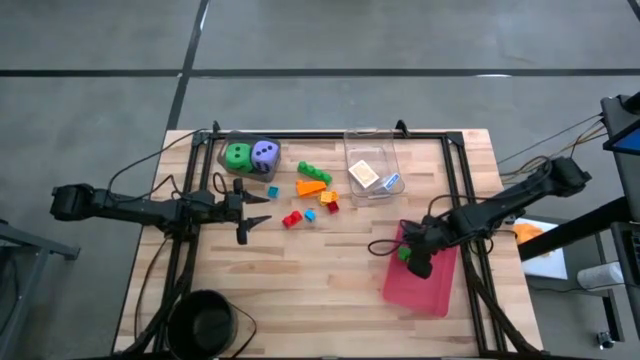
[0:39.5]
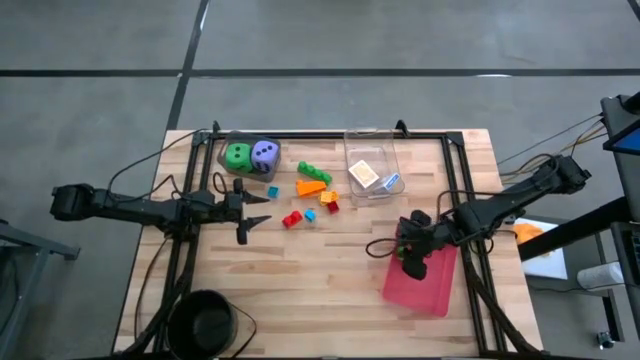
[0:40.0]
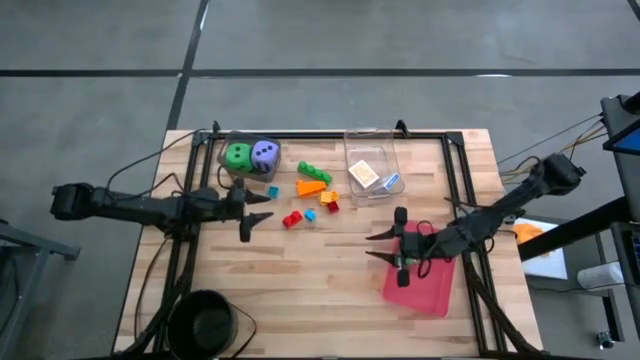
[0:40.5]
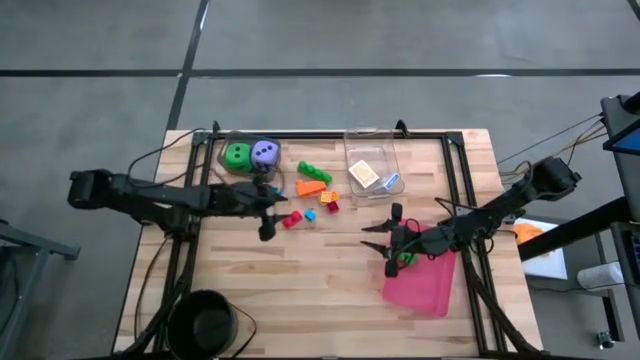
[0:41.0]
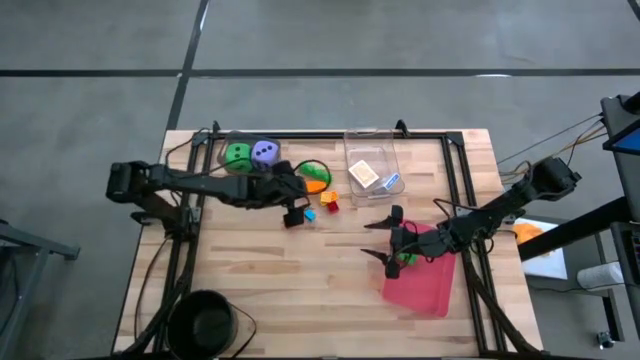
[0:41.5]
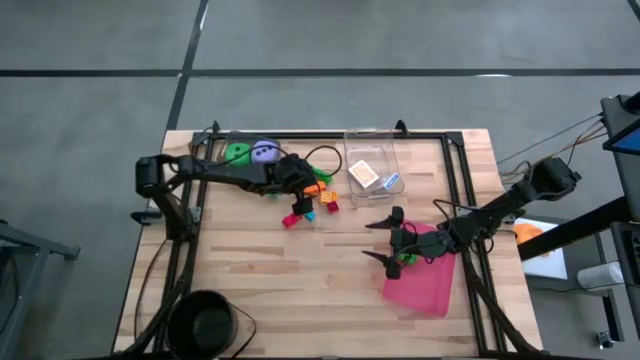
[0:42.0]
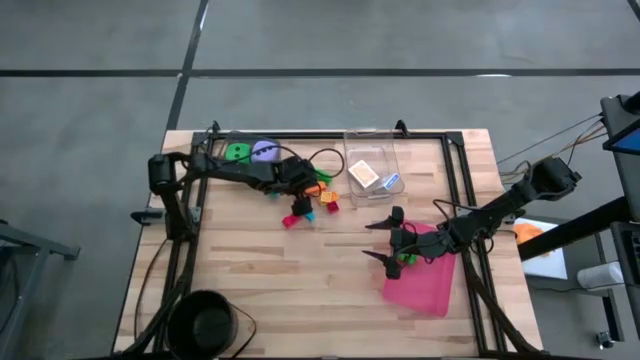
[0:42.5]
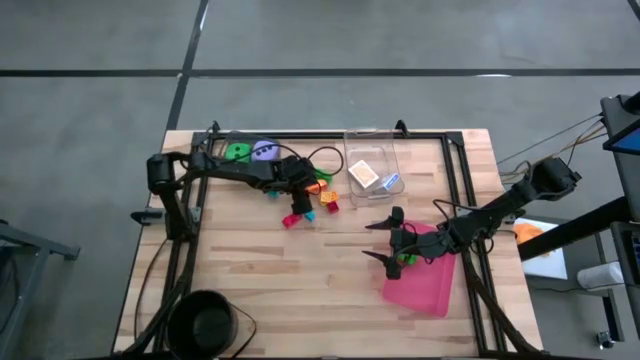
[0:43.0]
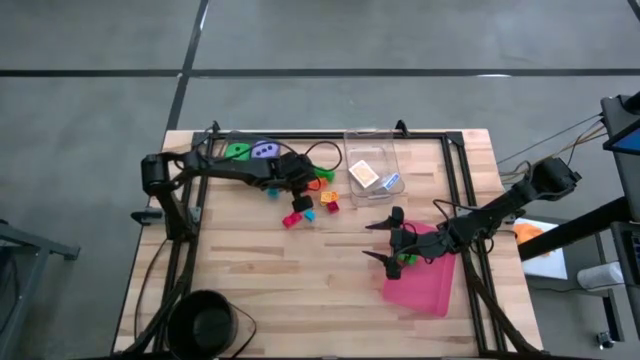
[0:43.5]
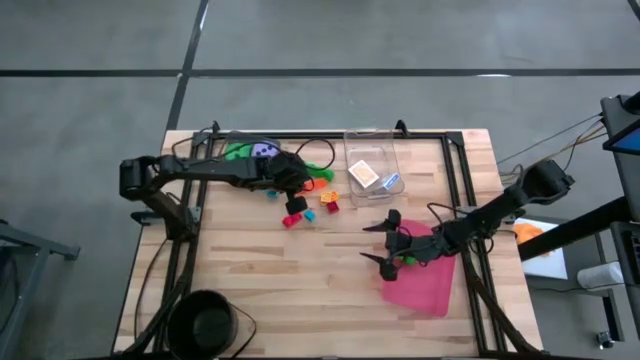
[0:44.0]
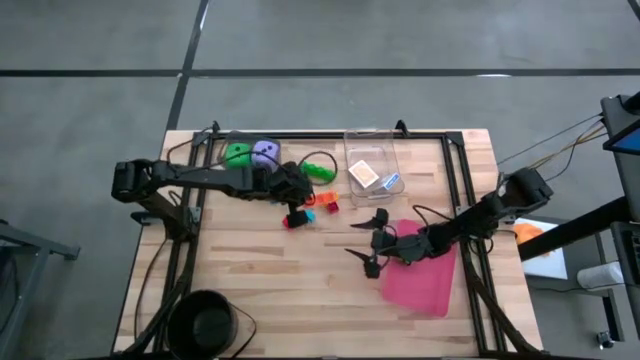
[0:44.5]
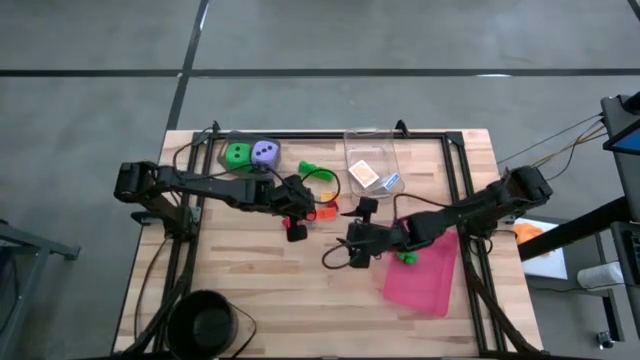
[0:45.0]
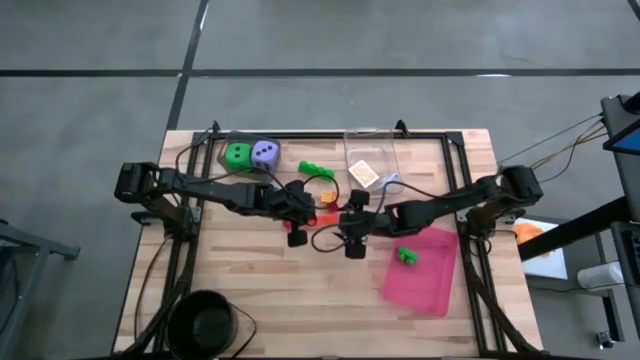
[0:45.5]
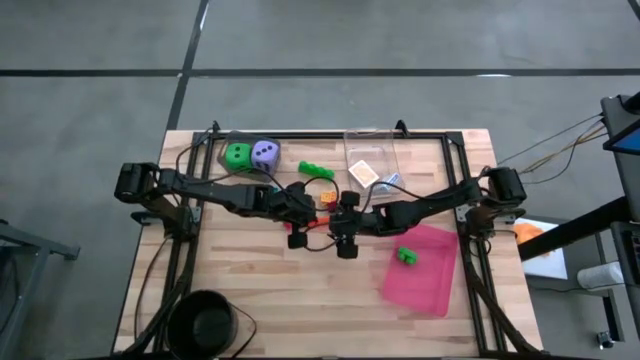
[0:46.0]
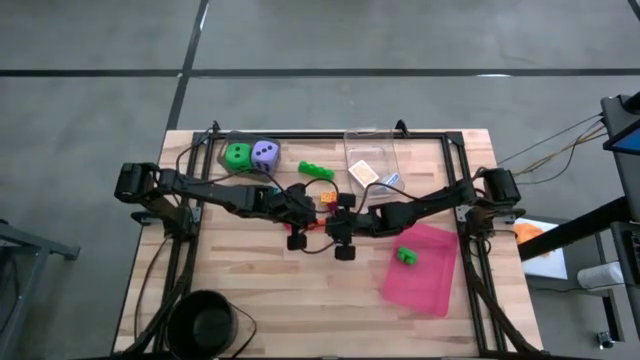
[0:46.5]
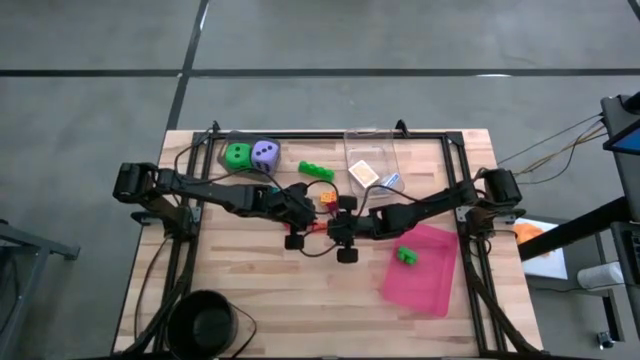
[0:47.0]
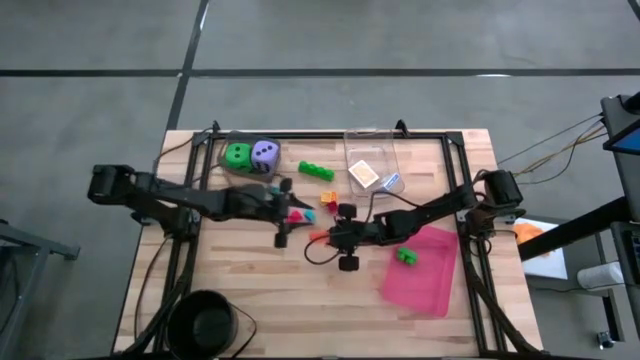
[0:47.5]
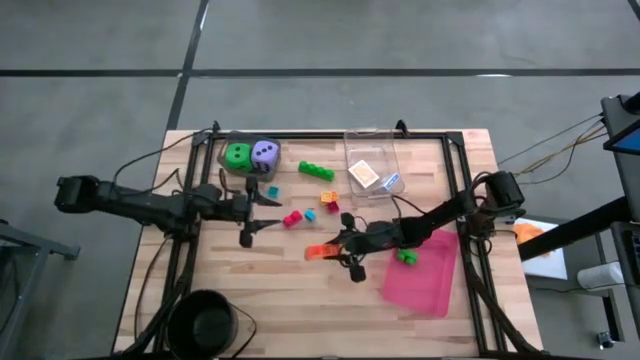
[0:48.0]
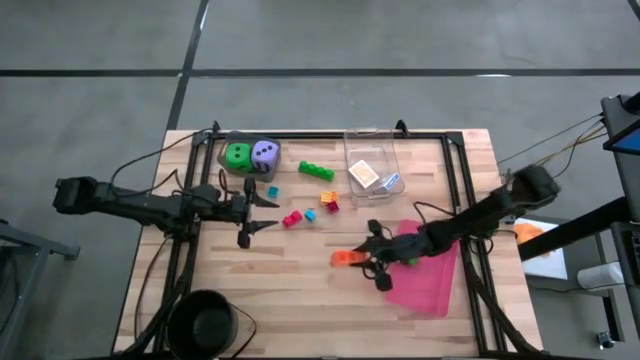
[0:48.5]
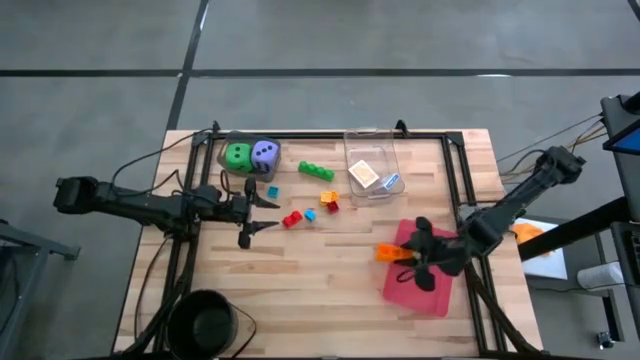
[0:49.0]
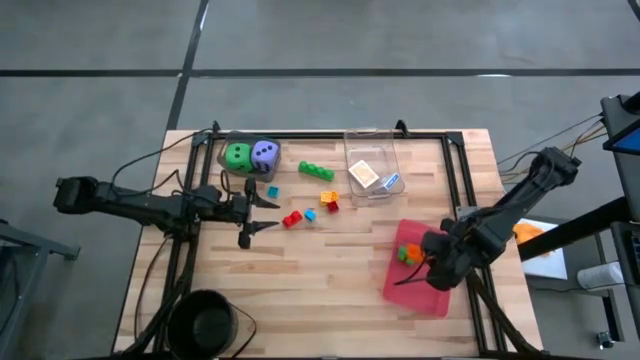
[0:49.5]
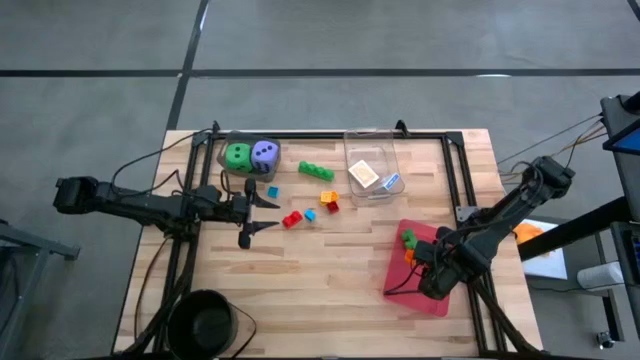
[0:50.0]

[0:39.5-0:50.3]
Task: Pick & Place Toys
Put the orange game piece into the pink bin

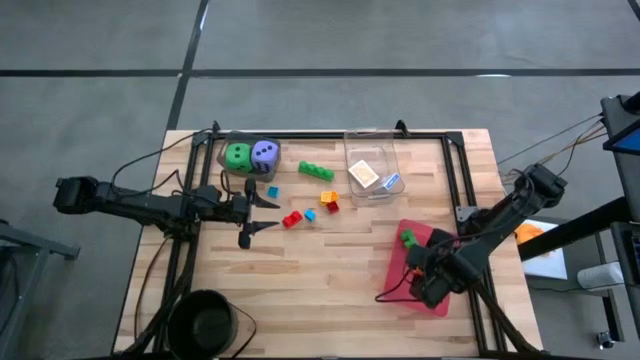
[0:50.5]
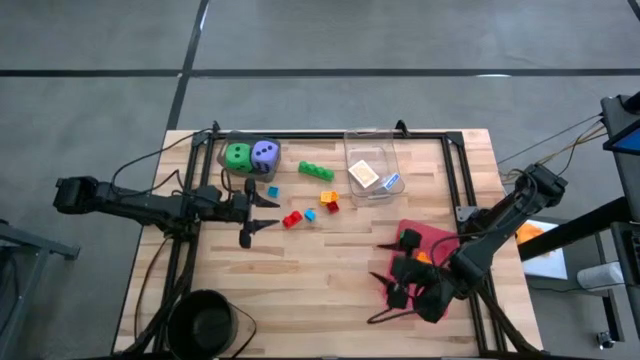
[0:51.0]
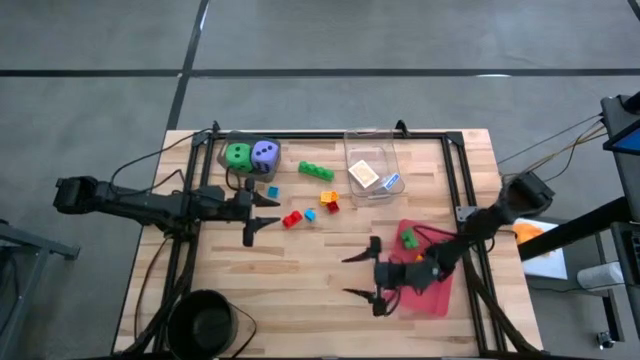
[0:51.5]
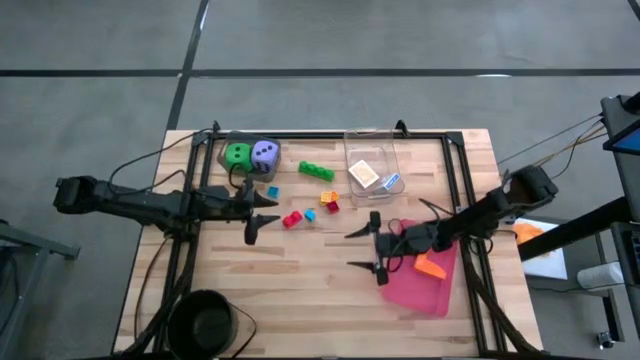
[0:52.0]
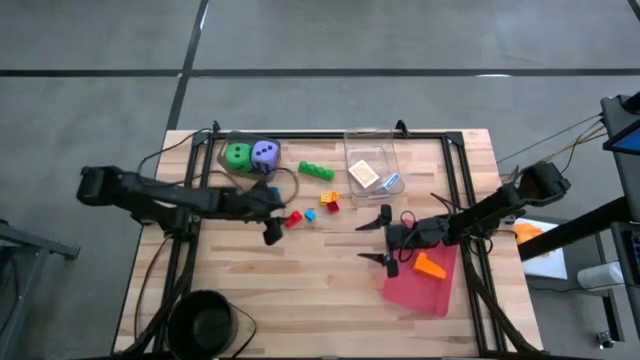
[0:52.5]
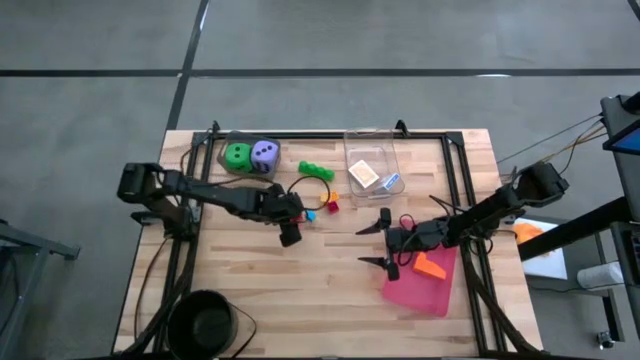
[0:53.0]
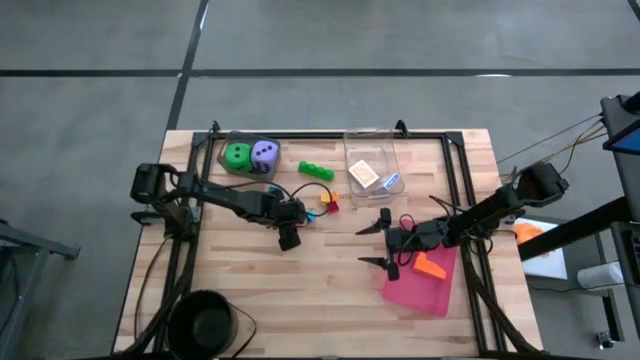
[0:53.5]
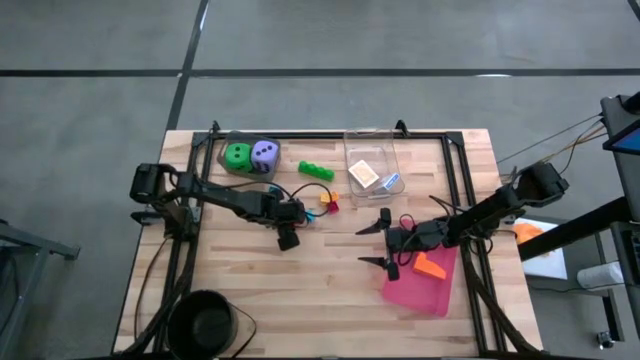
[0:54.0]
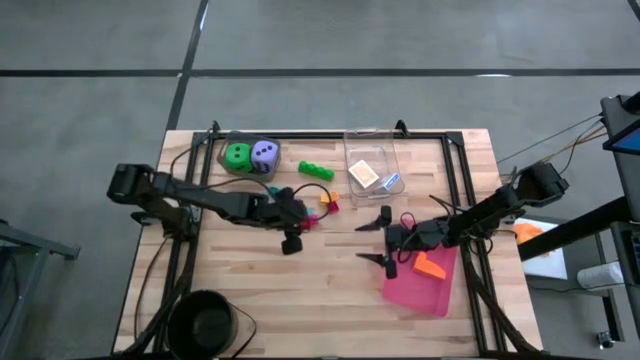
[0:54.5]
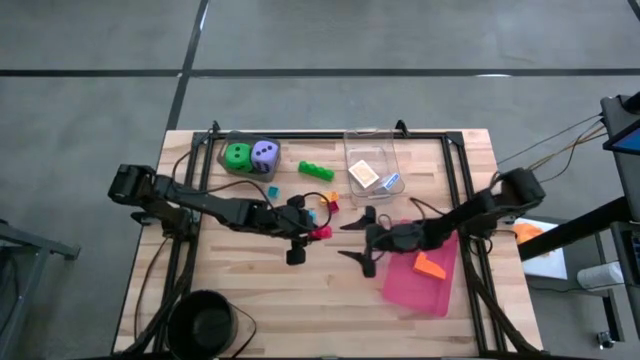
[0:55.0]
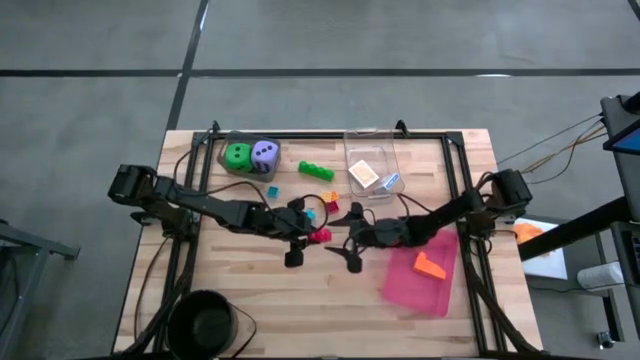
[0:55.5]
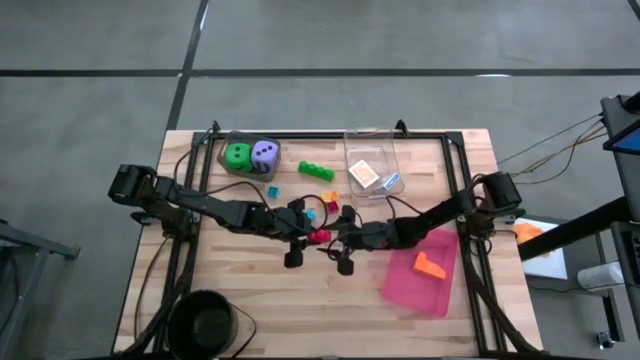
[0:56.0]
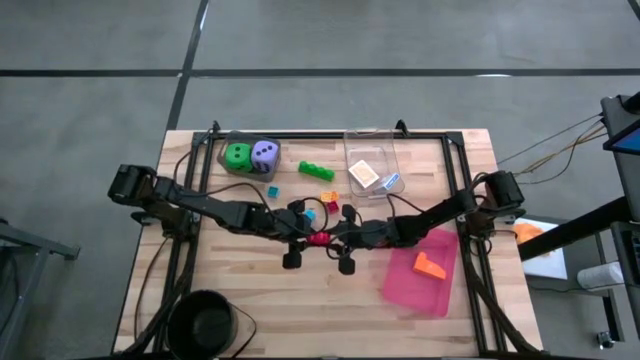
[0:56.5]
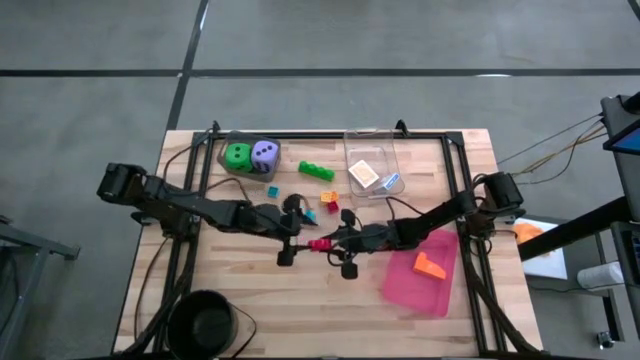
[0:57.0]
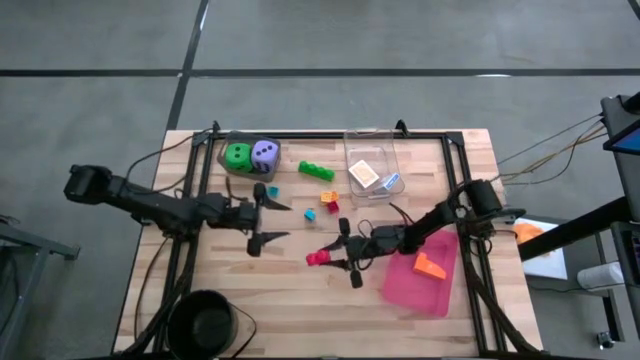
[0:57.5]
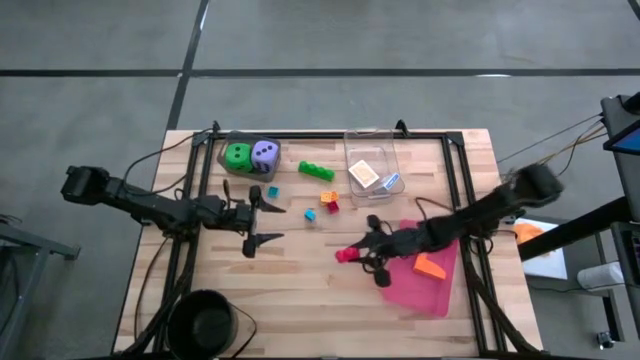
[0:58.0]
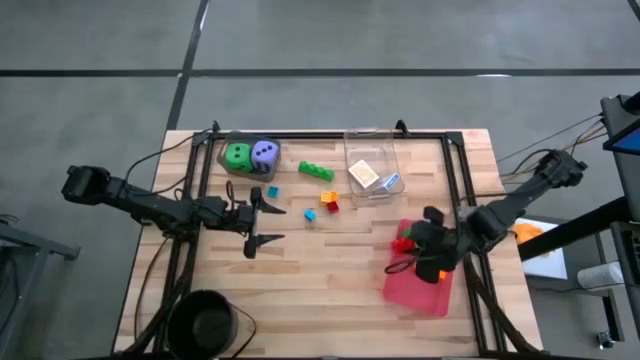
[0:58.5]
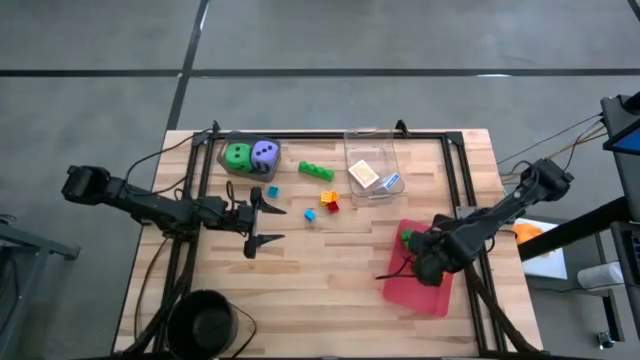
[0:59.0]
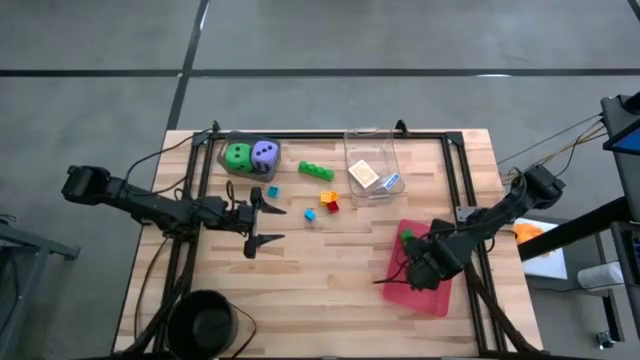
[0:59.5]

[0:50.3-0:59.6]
Put the left red game piece into the pink bin
